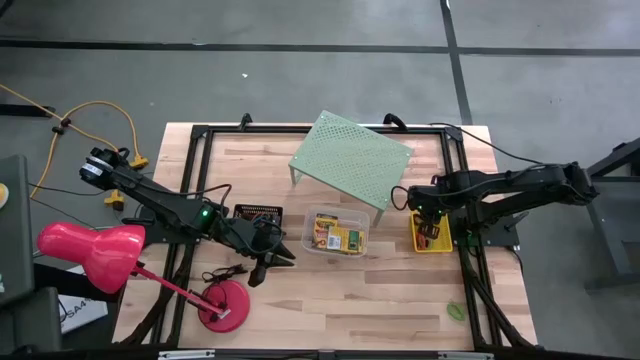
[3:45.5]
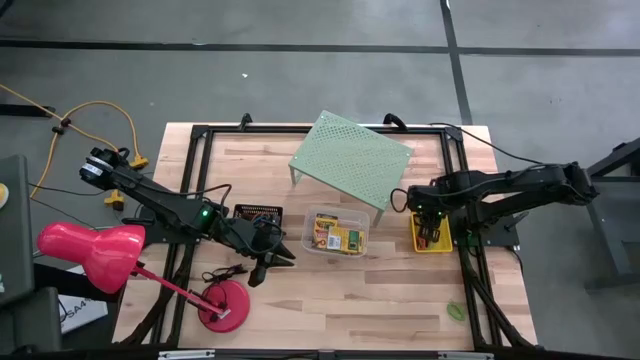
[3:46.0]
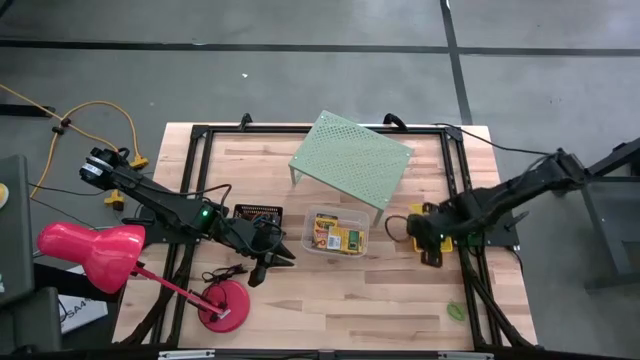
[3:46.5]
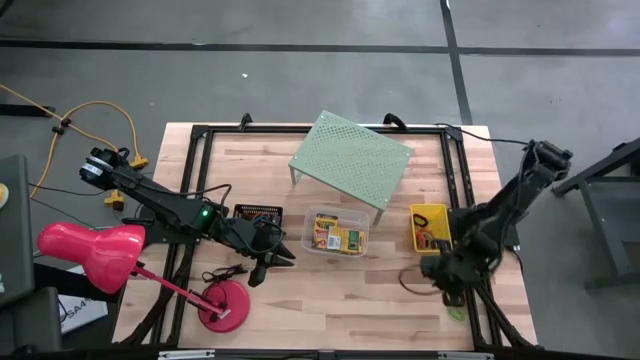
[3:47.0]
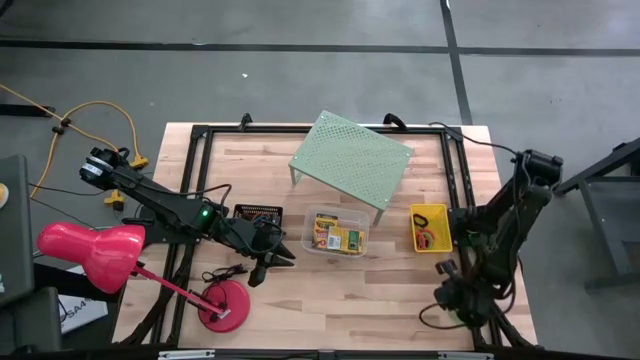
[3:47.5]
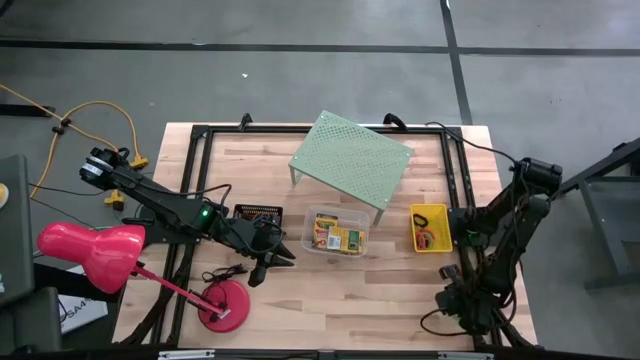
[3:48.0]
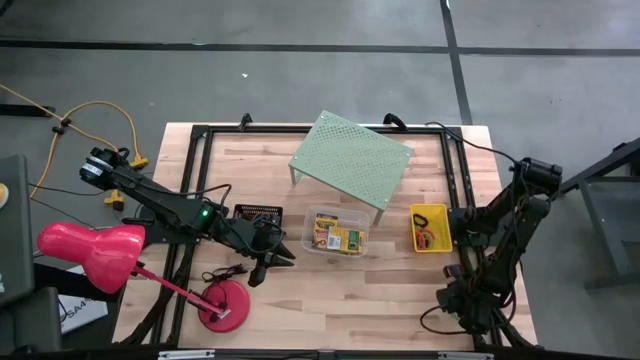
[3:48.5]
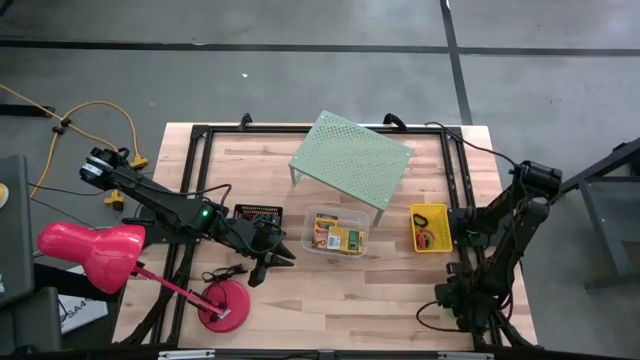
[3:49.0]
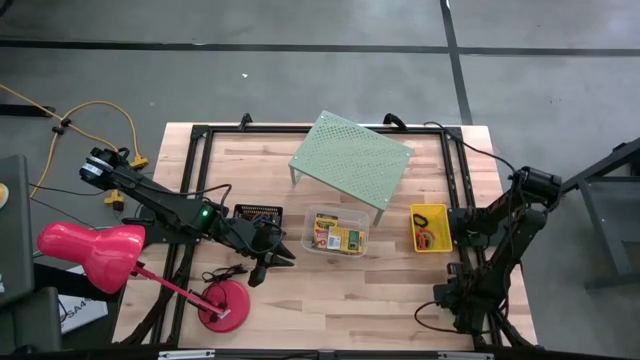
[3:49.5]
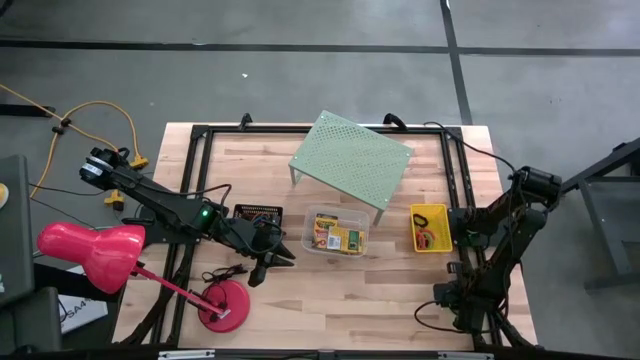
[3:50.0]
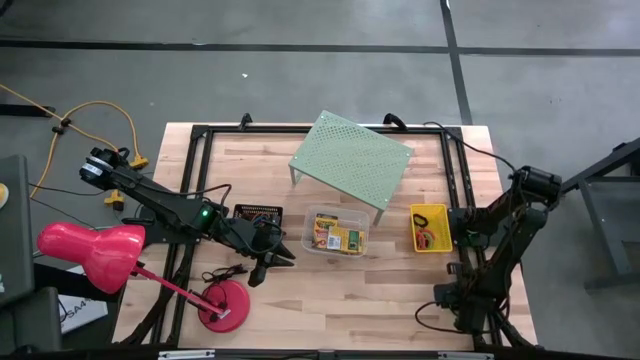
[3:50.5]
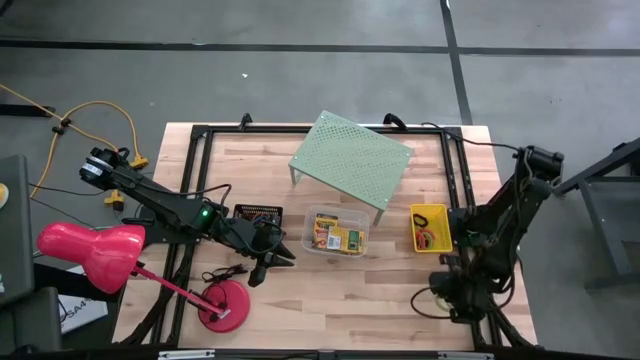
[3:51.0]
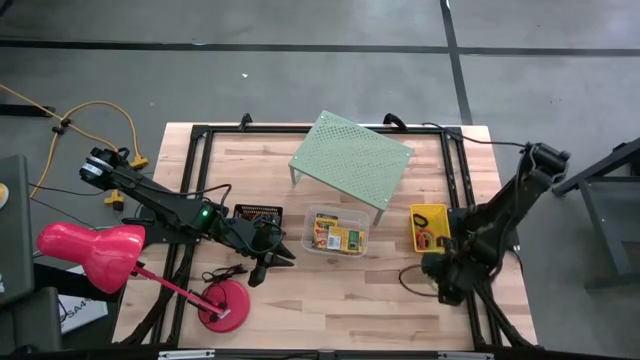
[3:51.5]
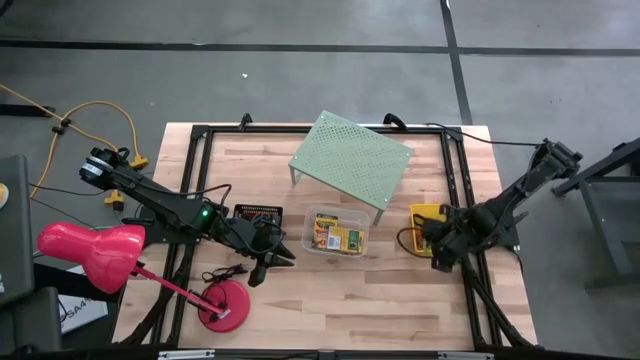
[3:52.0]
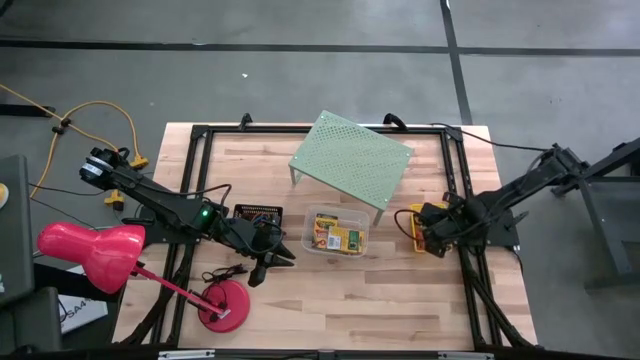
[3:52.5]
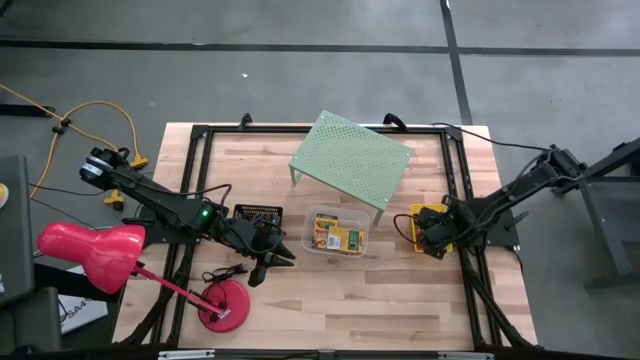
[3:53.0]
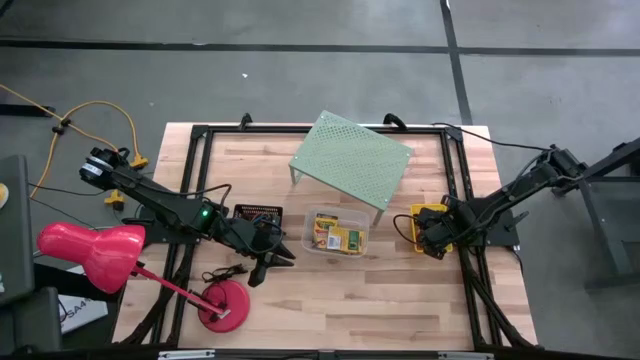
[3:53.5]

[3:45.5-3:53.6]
Task: Pick & Place Office Desk Supplies
Put the green spring keychain into the yellow bin

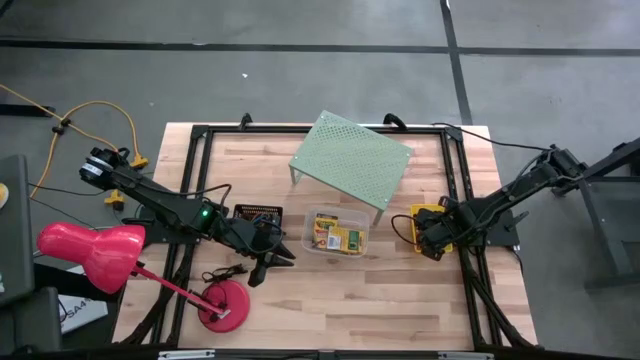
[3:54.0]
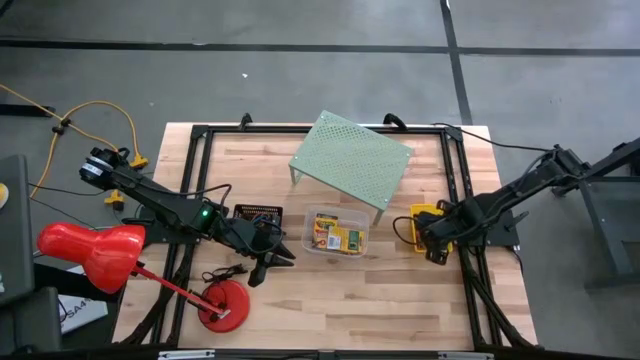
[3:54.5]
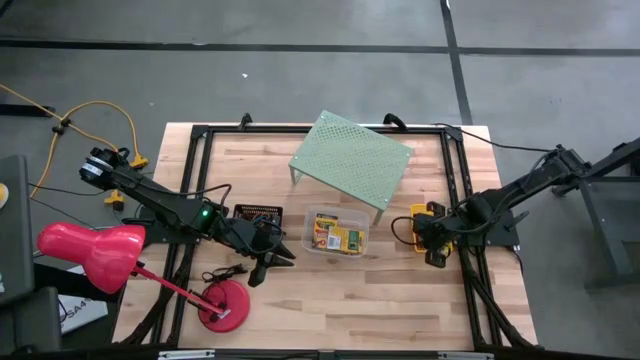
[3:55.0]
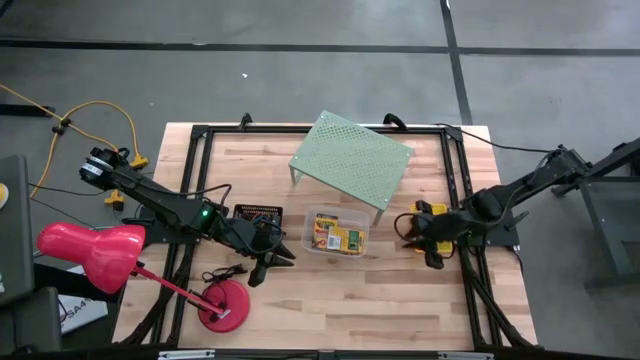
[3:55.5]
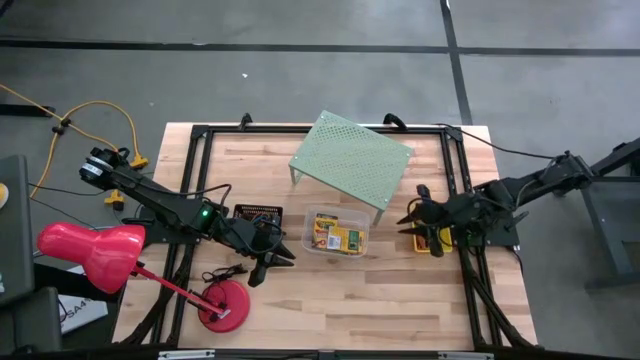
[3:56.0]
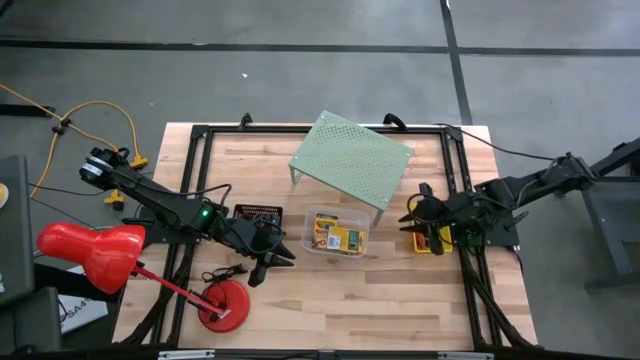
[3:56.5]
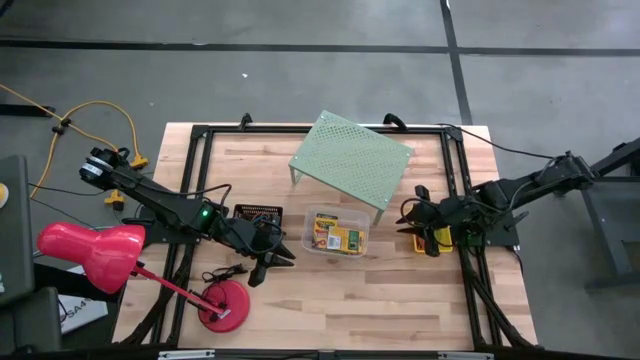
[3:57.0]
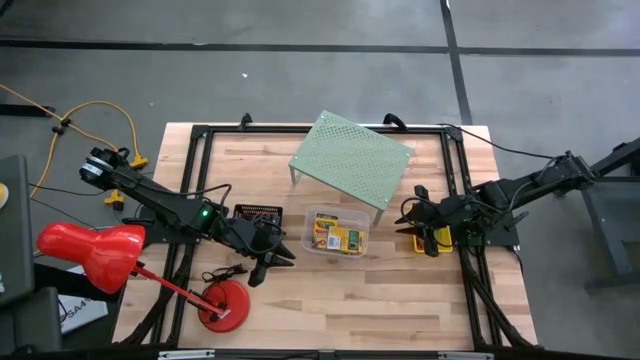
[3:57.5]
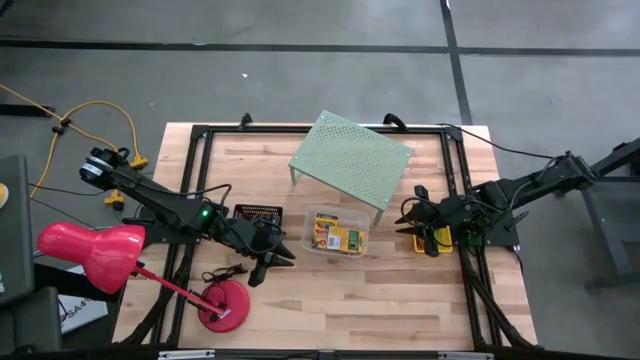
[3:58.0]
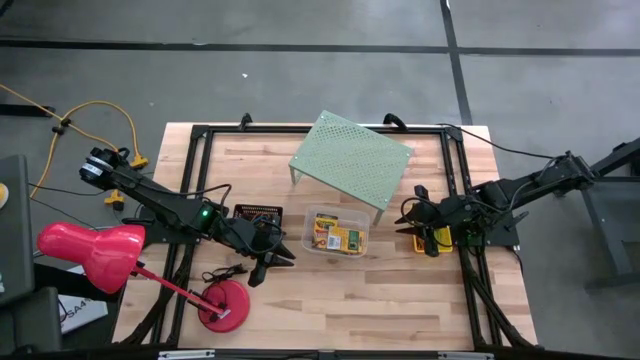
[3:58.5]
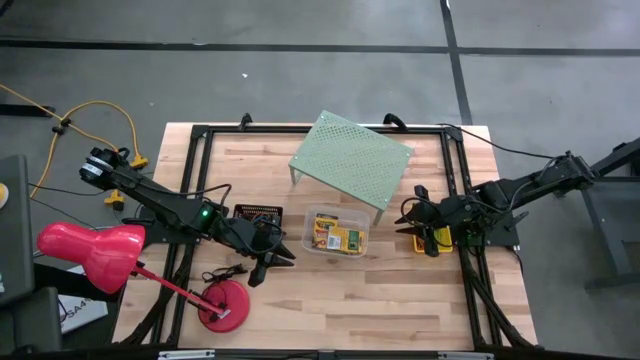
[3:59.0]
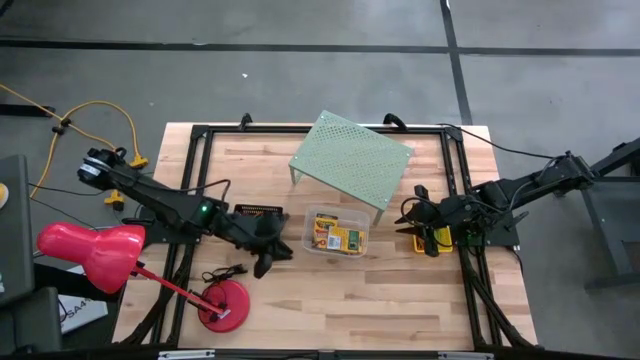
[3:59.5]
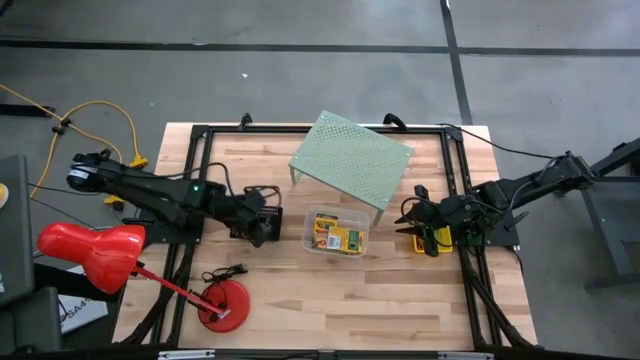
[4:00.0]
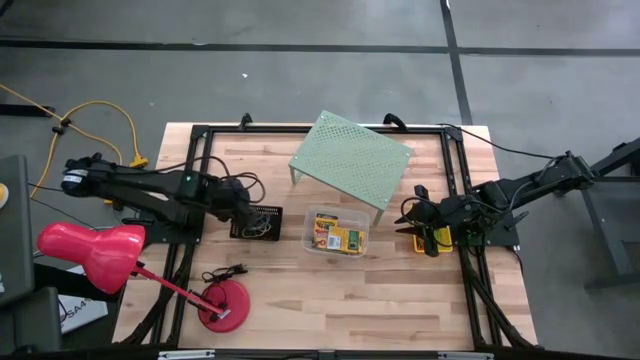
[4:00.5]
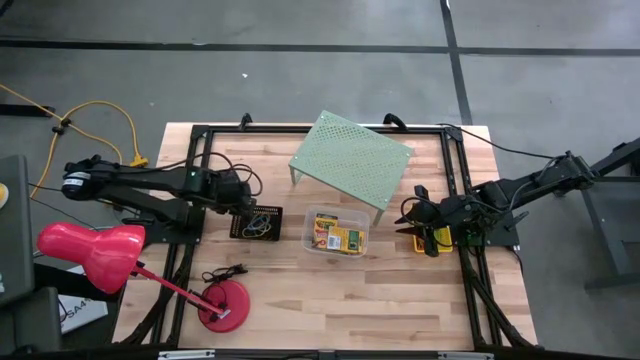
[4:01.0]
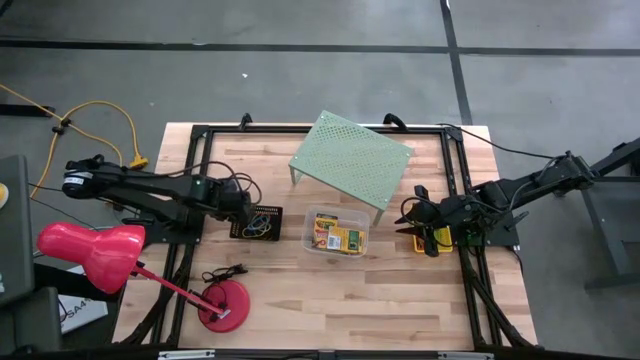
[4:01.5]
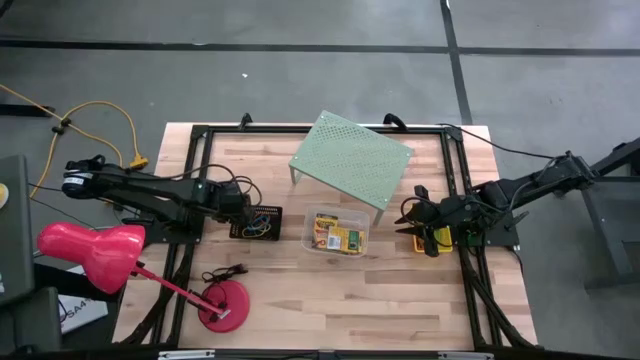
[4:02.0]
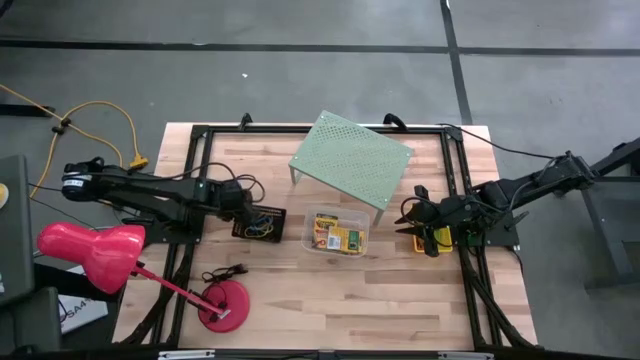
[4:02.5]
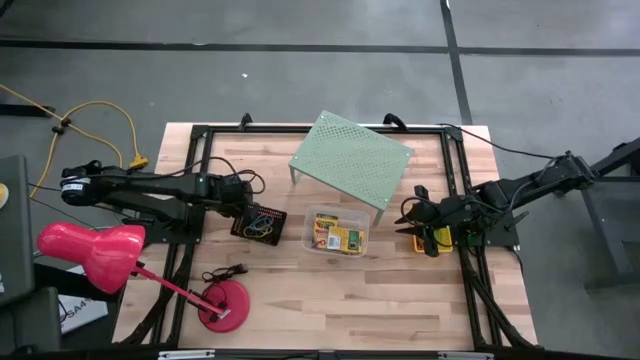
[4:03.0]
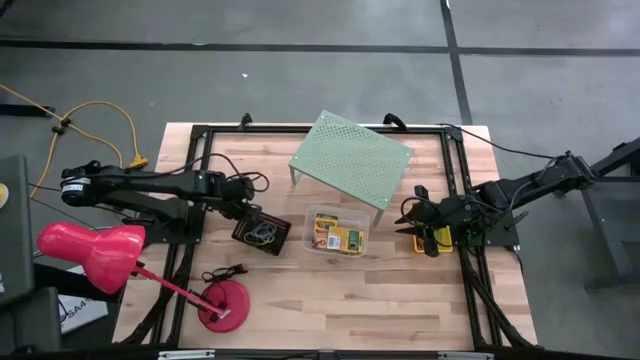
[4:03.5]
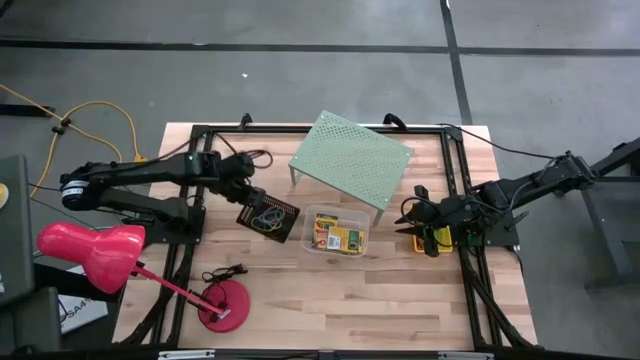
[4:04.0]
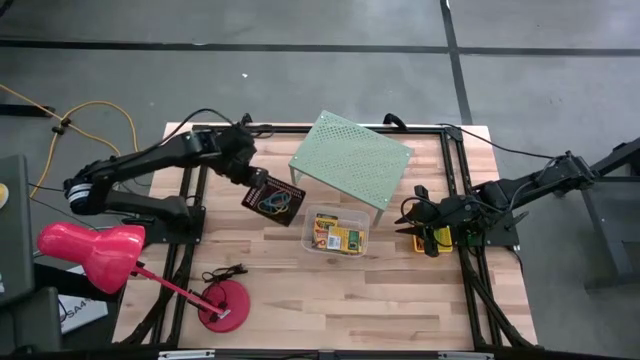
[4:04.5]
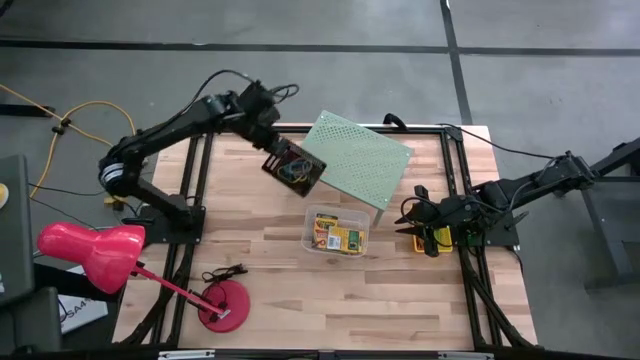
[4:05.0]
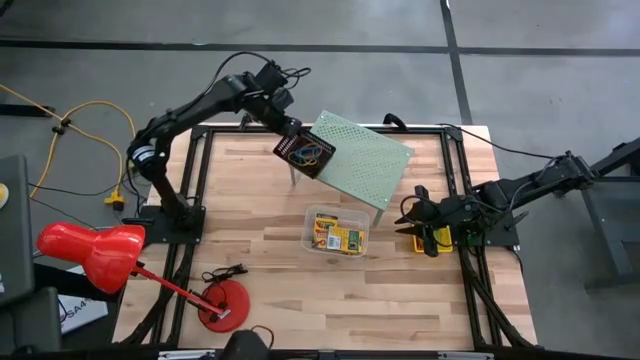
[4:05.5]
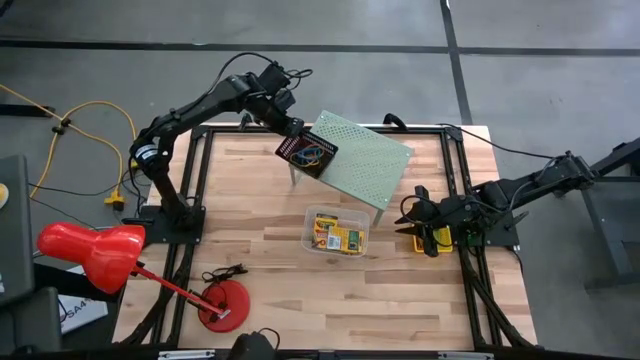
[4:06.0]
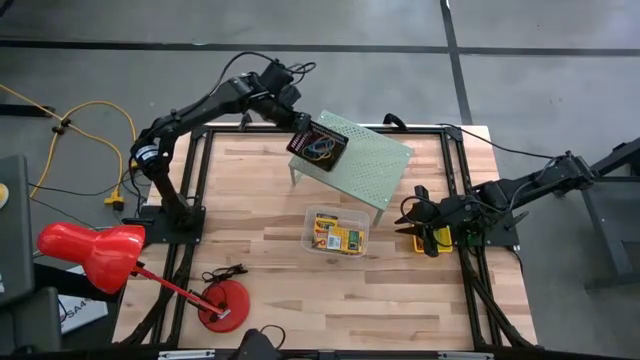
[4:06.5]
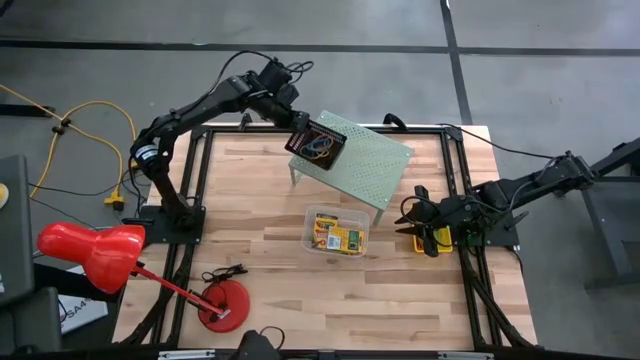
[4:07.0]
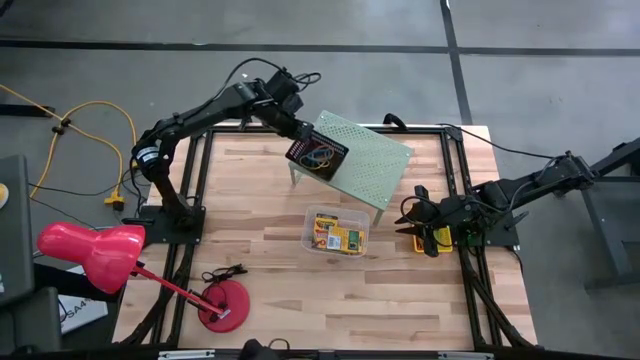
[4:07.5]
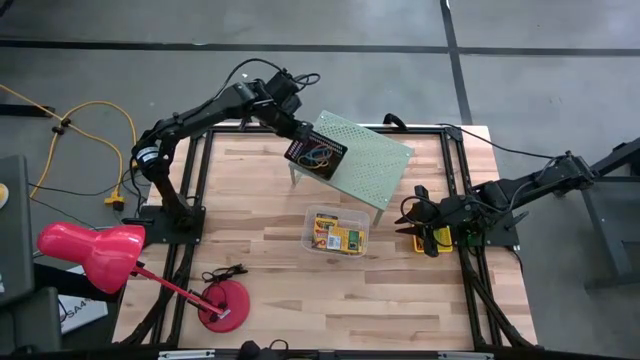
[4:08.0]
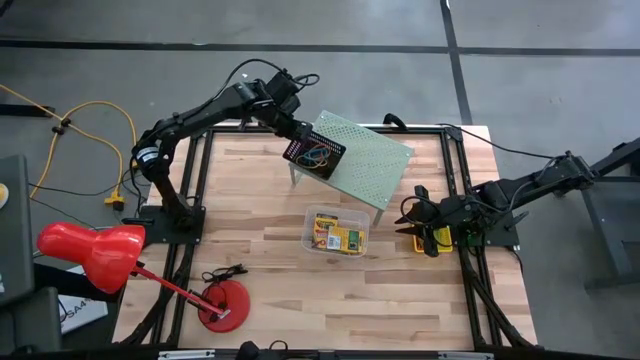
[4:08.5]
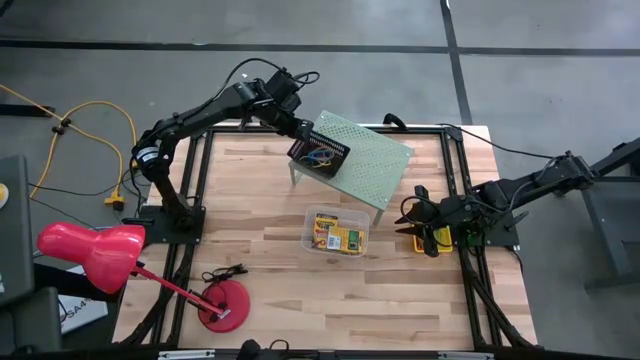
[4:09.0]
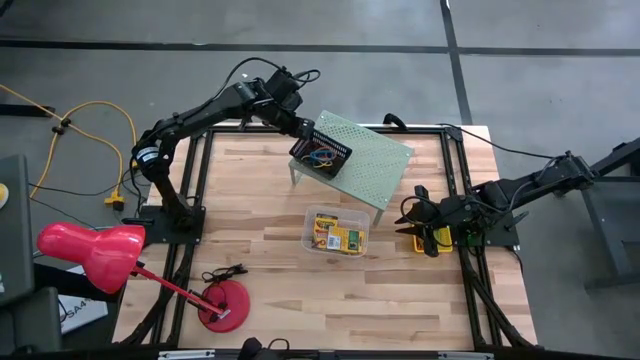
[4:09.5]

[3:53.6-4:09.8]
Put the black bin with rubber bands on the shelf
